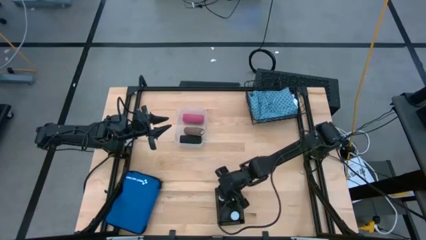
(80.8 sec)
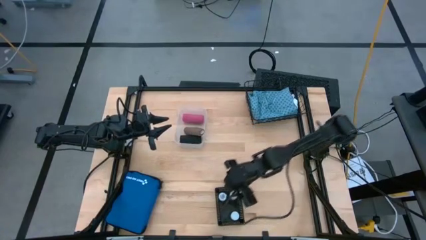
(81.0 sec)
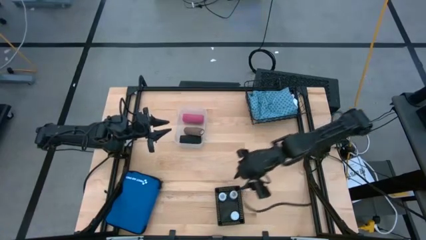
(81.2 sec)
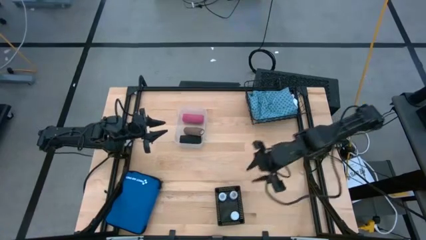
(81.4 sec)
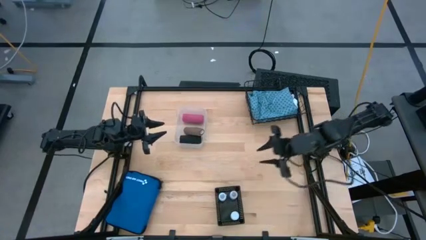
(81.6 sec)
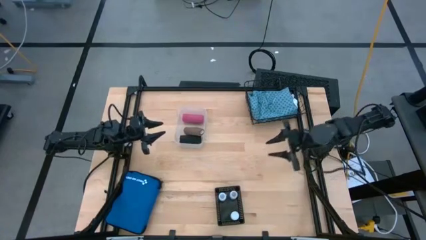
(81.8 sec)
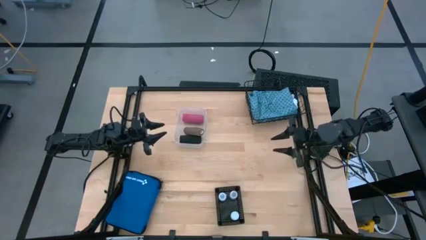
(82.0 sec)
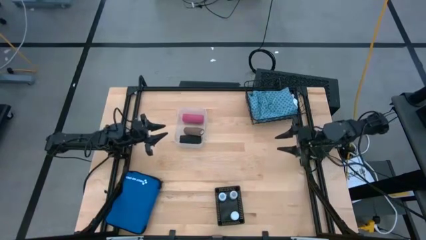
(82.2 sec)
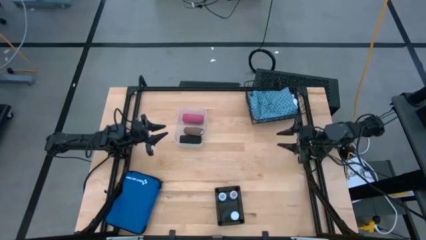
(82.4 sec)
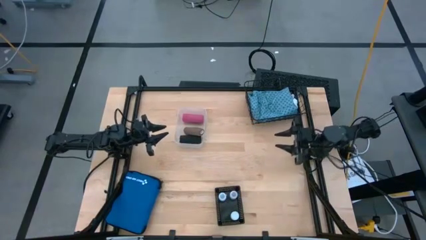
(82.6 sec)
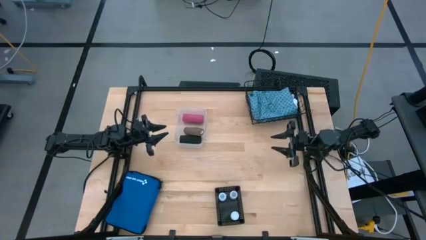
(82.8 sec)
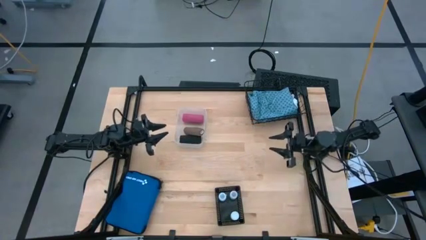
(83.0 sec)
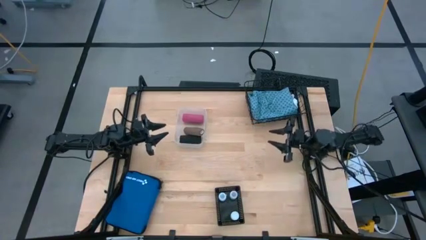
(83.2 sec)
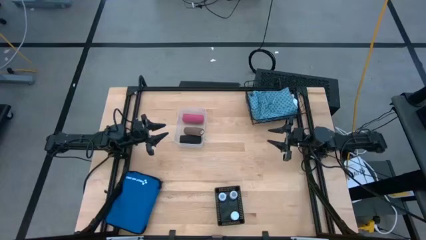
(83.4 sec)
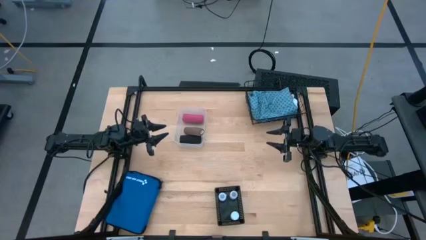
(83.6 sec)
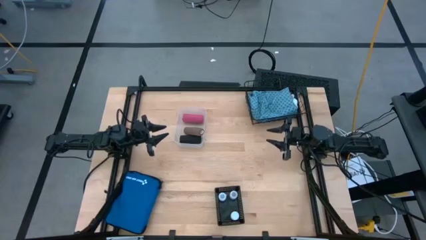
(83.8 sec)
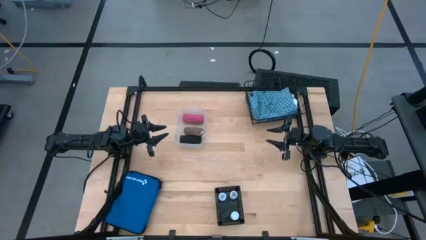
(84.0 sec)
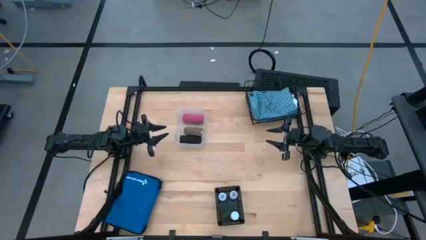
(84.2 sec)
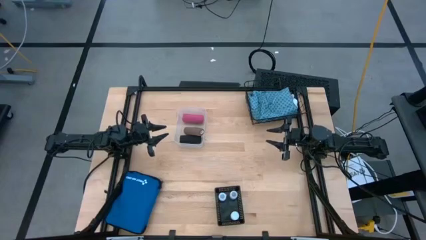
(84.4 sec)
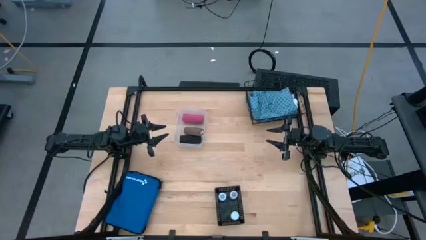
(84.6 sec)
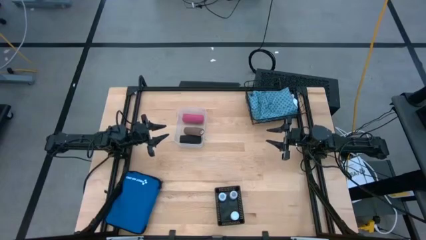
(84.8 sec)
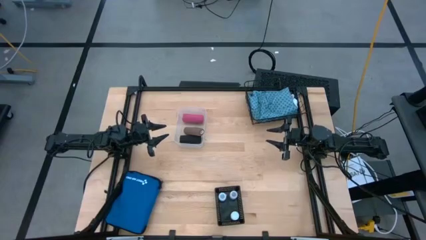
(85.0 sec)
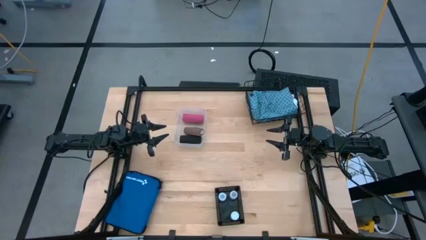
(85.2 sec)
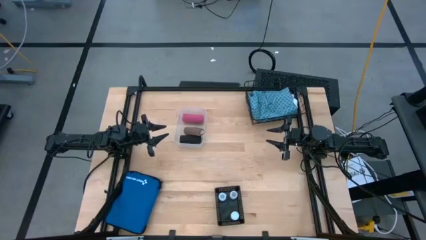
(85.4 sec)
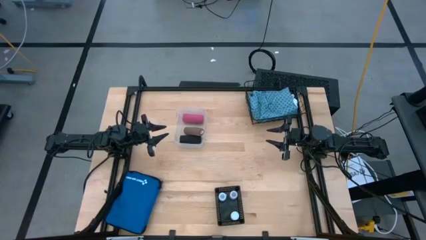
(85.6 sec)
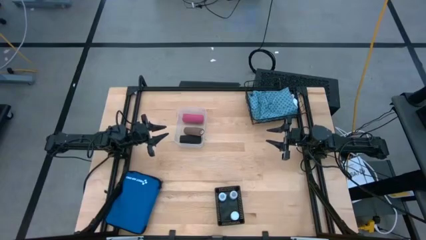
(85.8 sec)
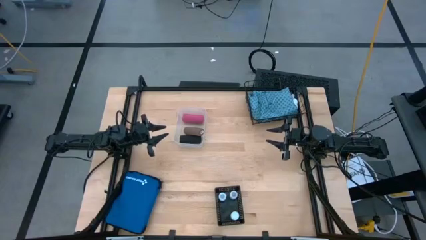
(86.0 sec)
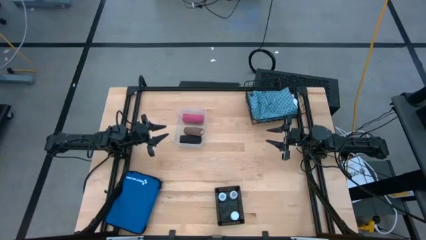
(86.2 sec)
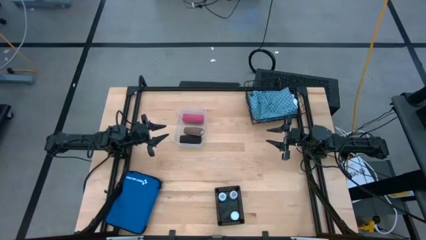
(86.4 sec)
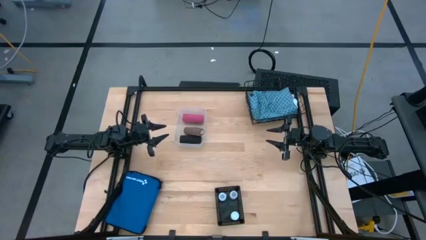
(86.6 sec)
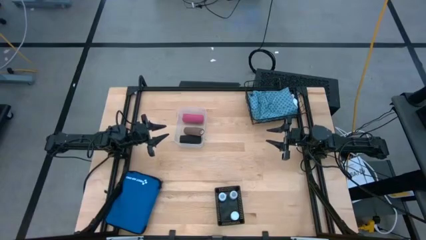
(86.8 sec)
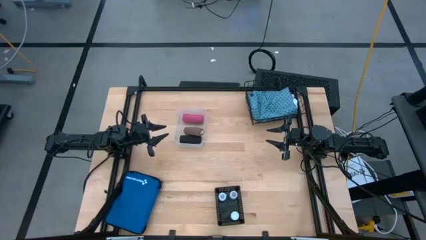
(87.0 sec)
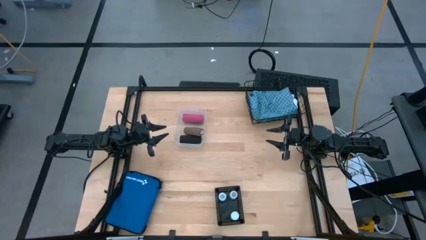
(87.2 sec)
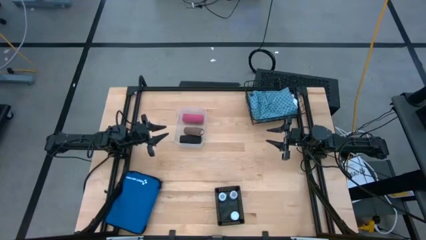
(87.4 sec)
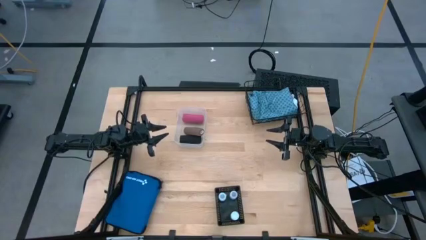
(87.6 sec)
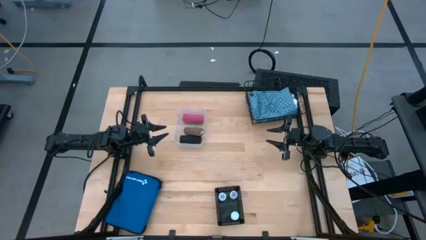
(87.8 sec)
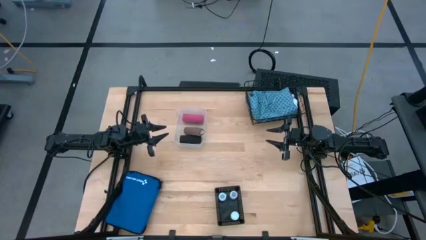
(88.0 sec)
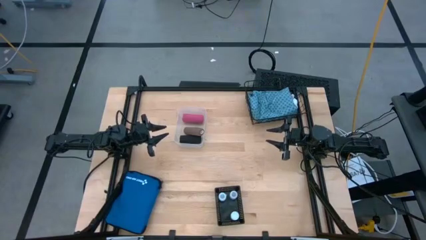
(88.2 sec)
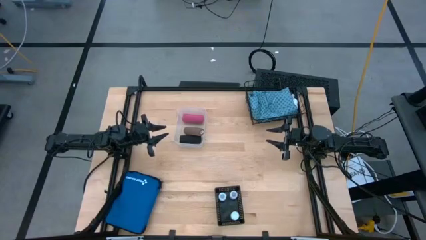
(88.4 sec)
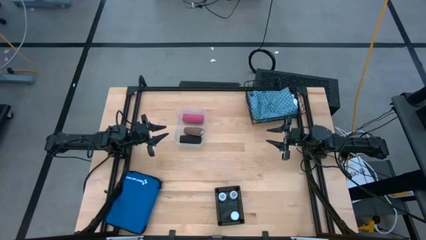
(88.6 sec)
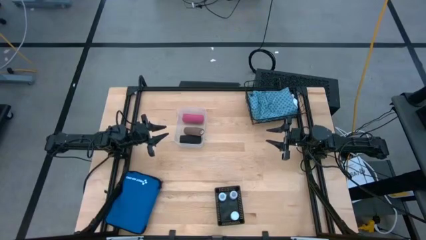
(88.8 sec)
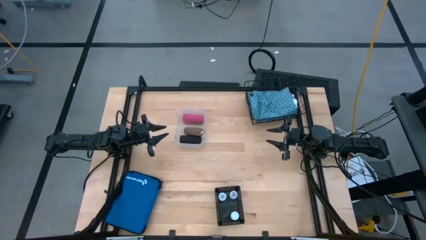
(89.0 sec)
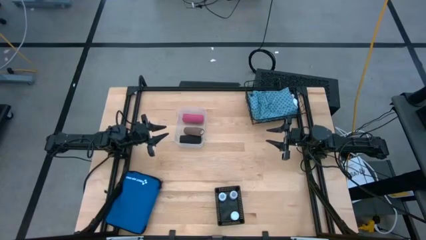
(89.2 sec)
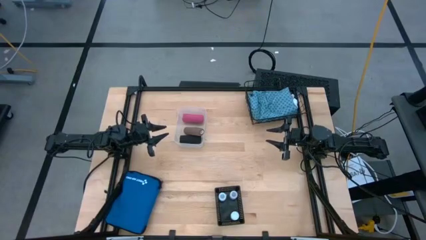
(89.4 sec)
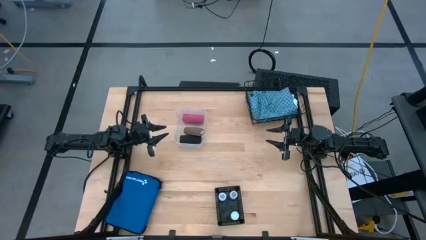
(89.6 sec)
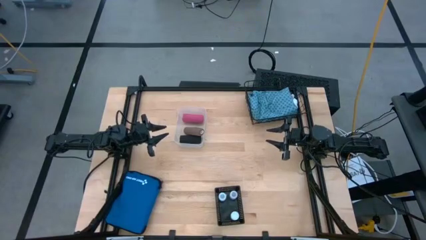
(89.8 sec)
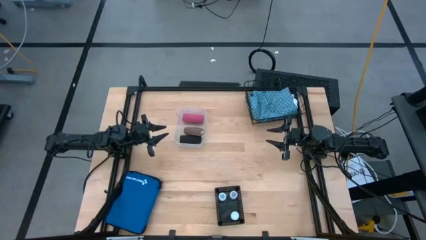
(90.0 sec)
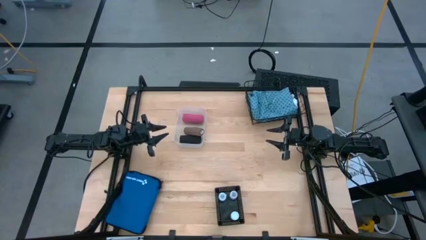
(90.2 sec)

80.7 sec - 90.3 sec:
Task: Pick & Place Medicine items
Return to Home Position
